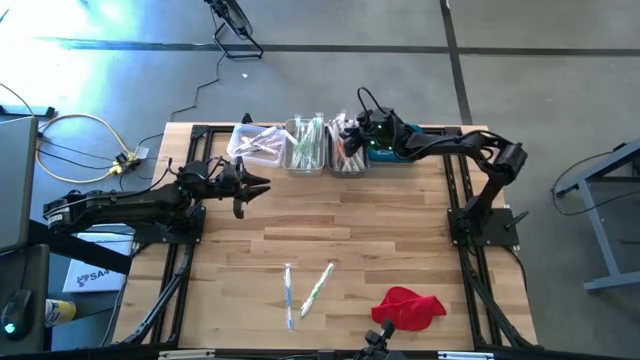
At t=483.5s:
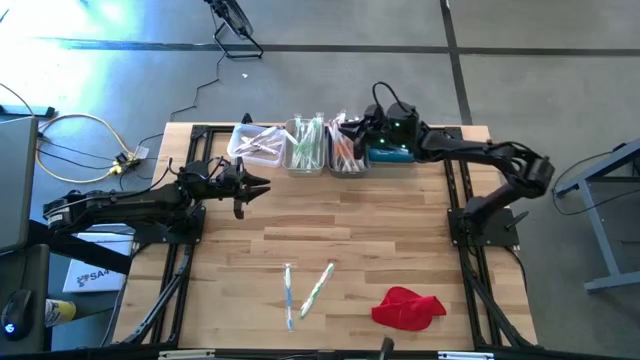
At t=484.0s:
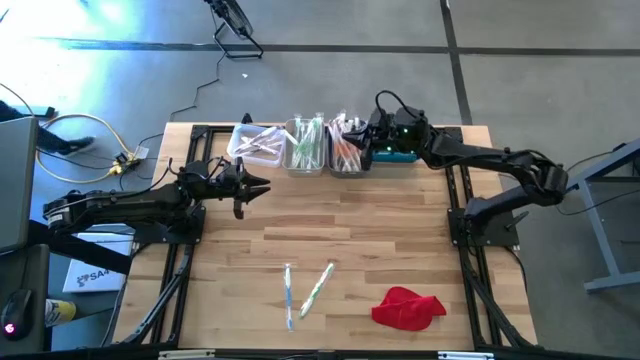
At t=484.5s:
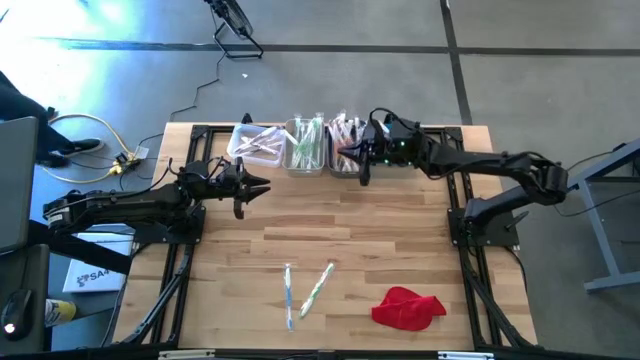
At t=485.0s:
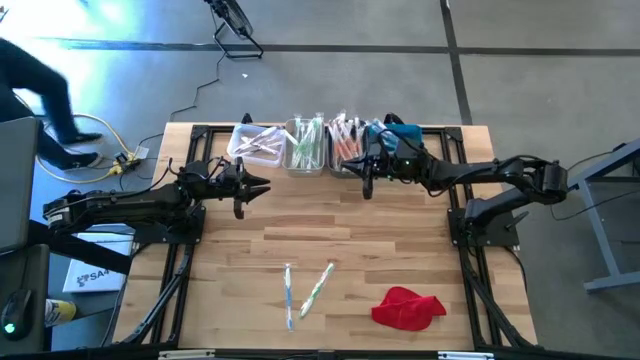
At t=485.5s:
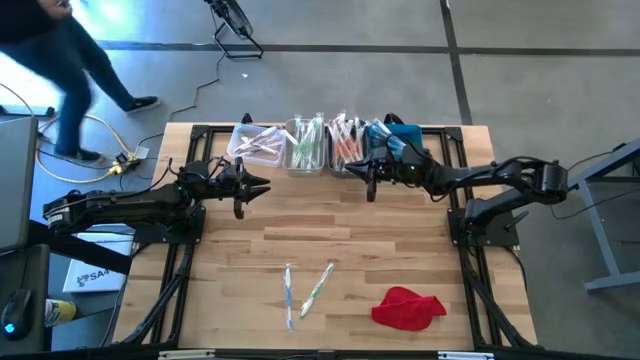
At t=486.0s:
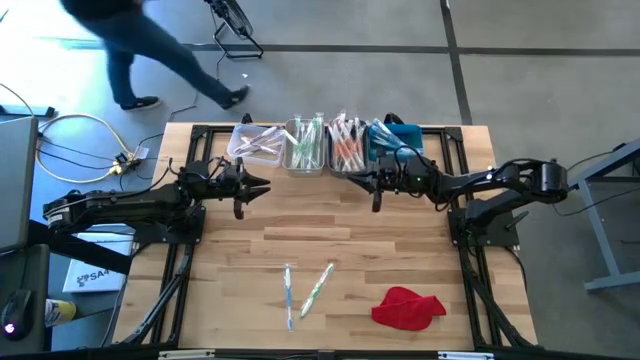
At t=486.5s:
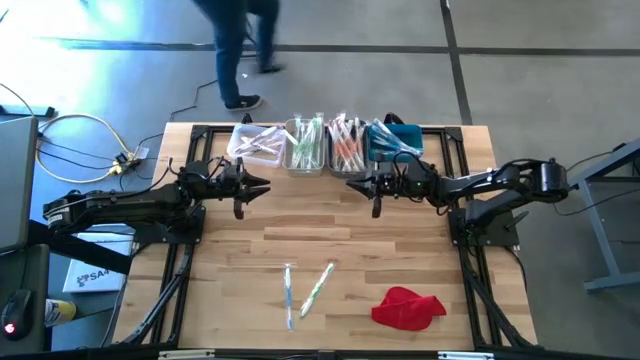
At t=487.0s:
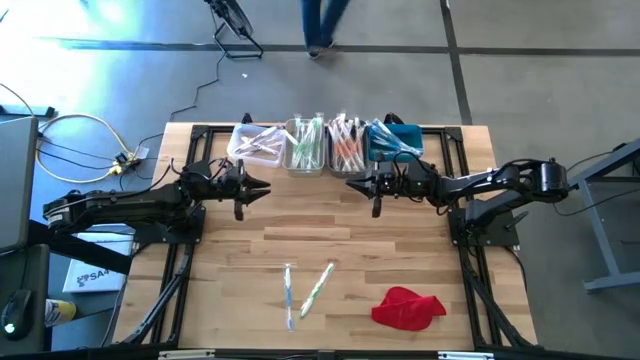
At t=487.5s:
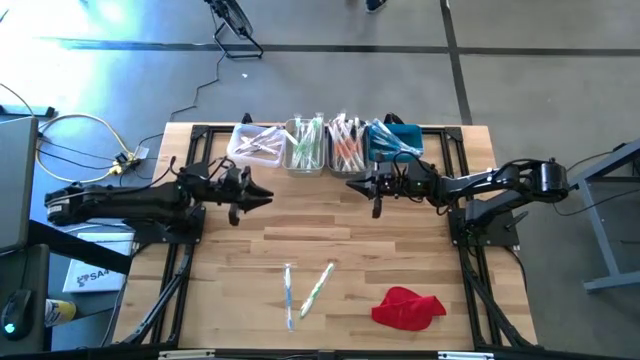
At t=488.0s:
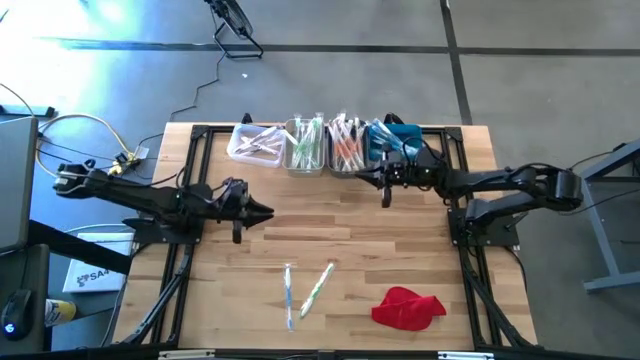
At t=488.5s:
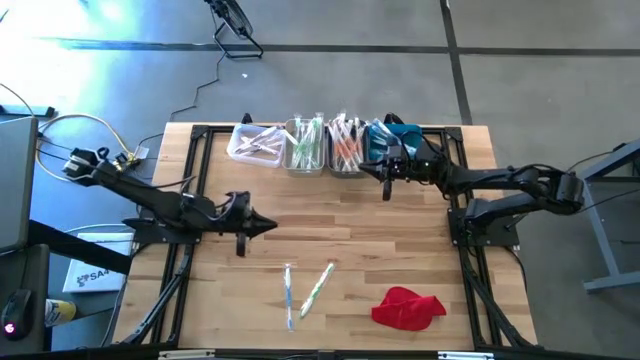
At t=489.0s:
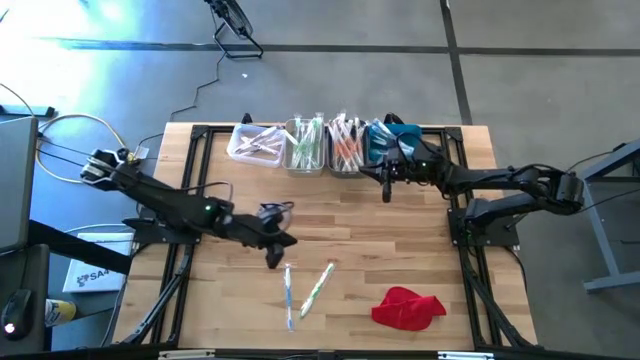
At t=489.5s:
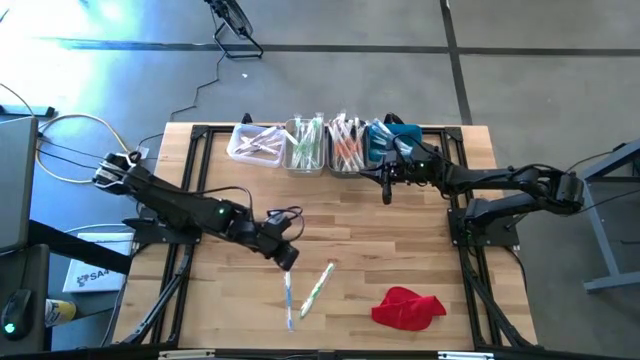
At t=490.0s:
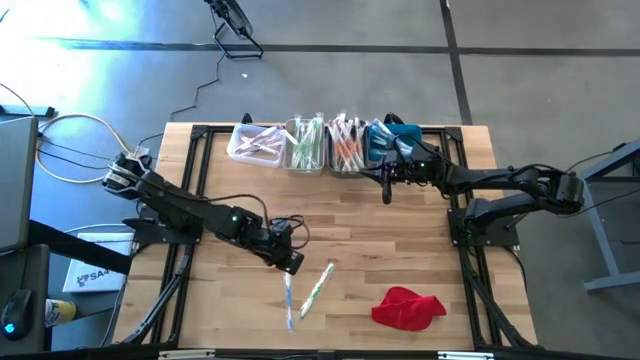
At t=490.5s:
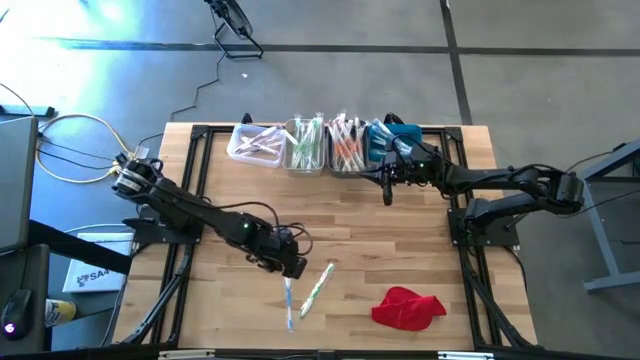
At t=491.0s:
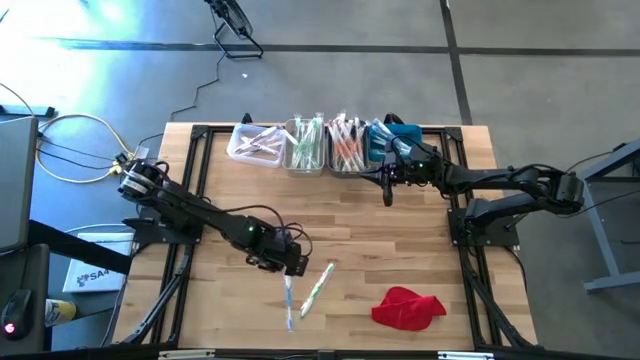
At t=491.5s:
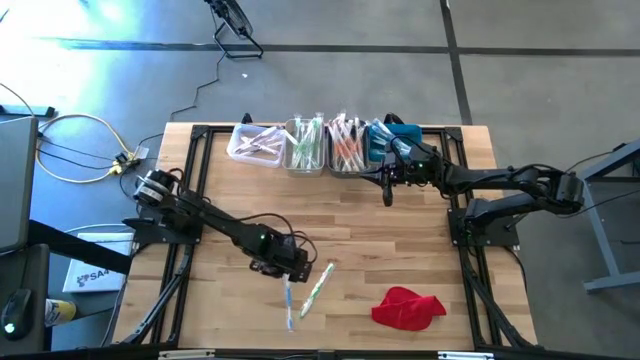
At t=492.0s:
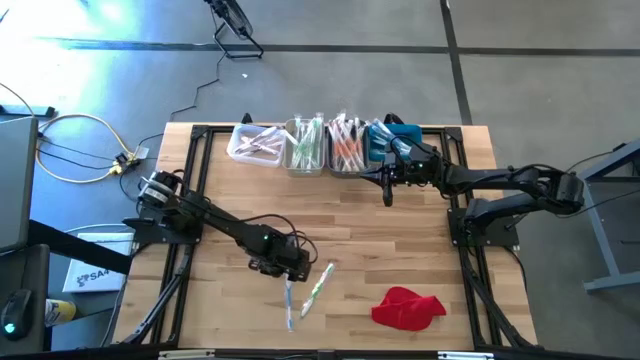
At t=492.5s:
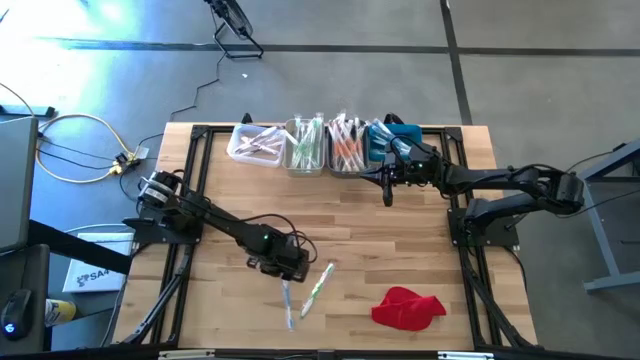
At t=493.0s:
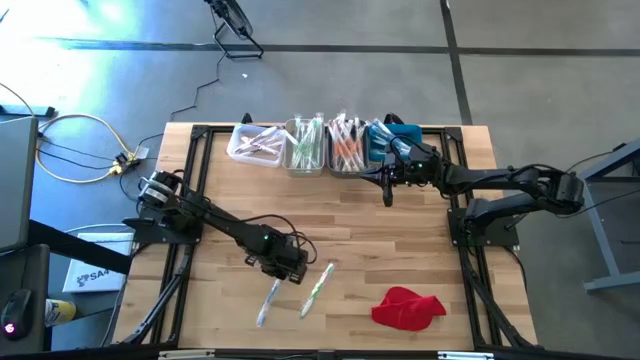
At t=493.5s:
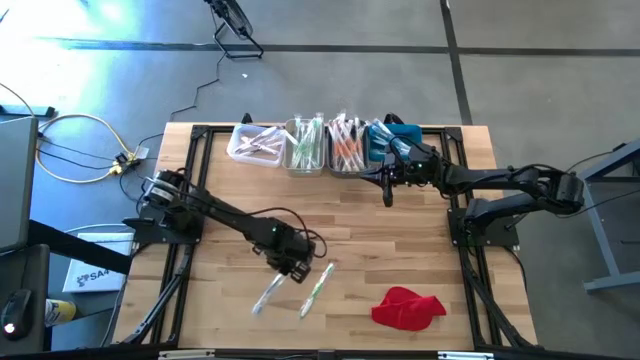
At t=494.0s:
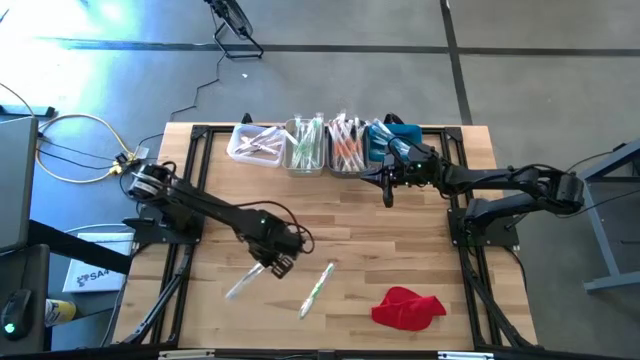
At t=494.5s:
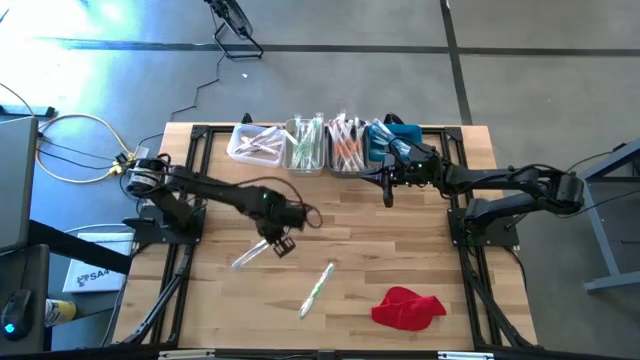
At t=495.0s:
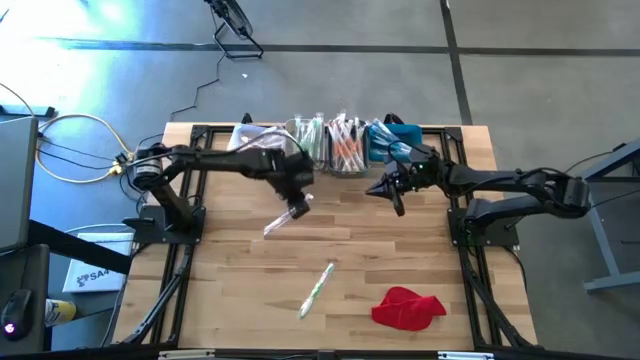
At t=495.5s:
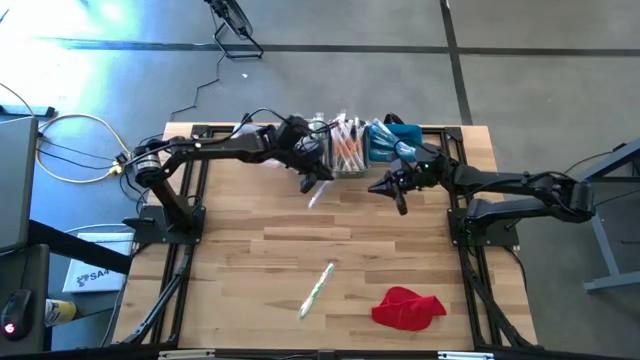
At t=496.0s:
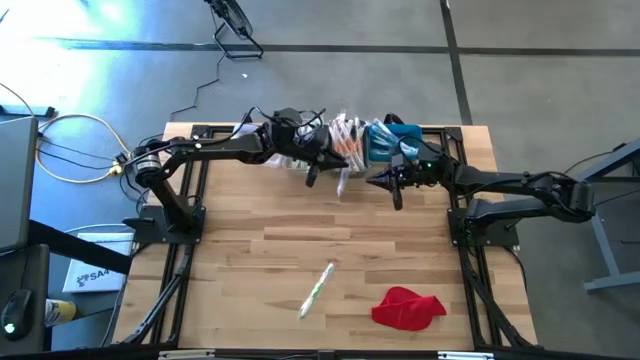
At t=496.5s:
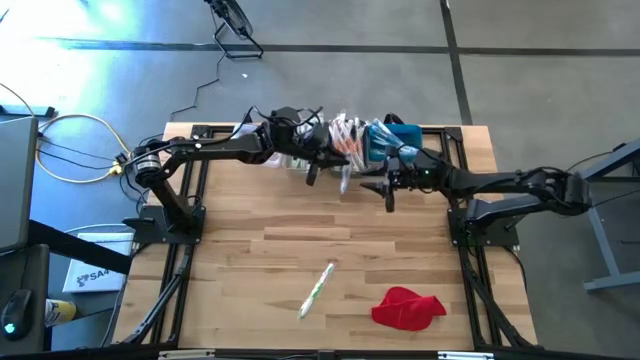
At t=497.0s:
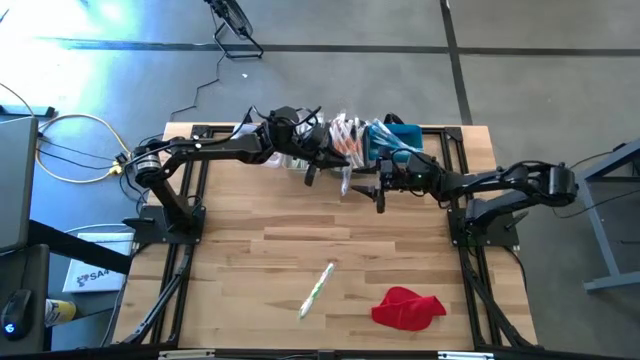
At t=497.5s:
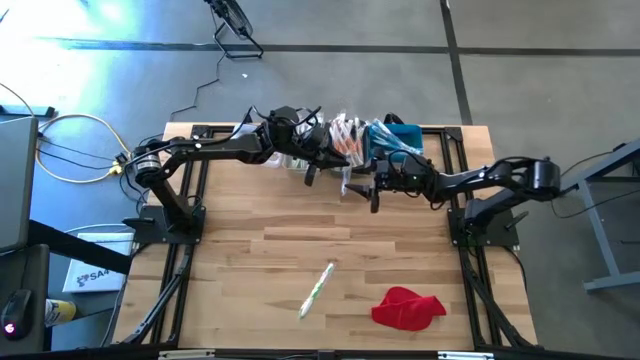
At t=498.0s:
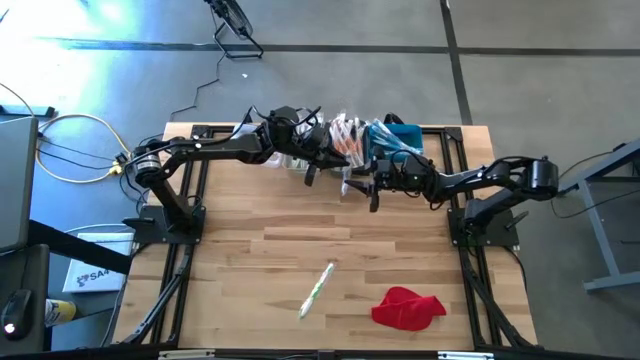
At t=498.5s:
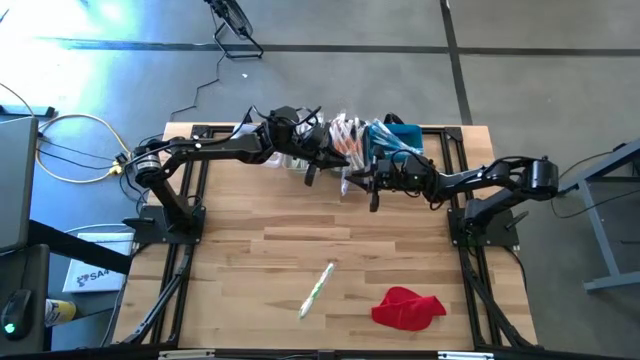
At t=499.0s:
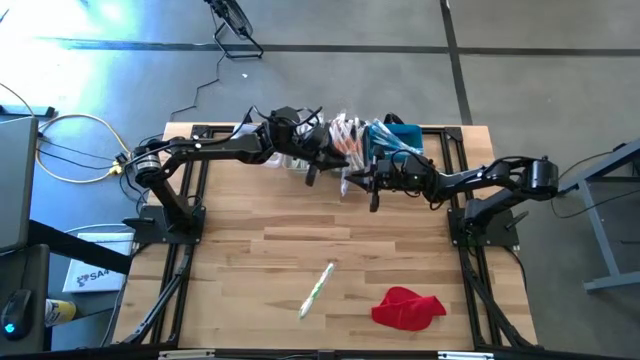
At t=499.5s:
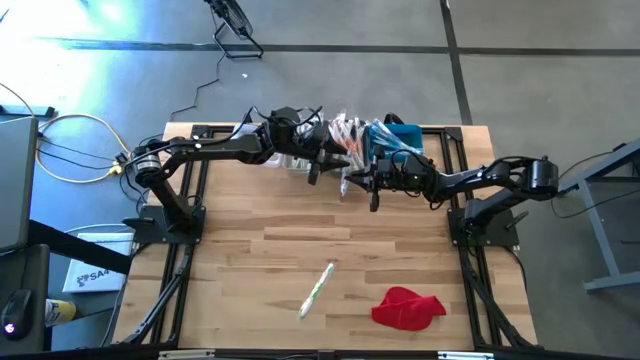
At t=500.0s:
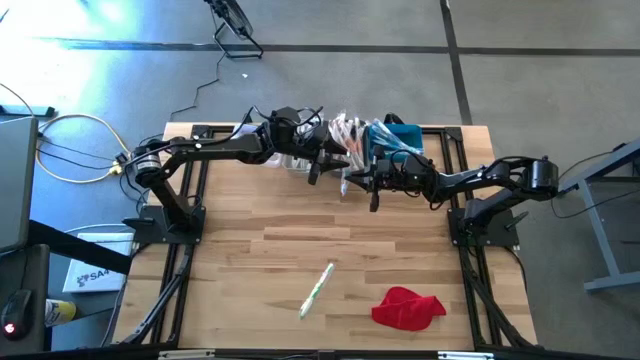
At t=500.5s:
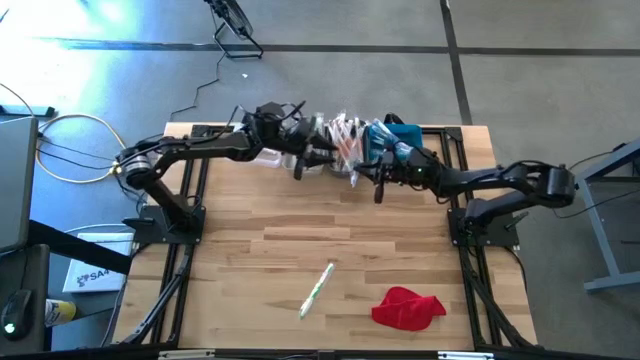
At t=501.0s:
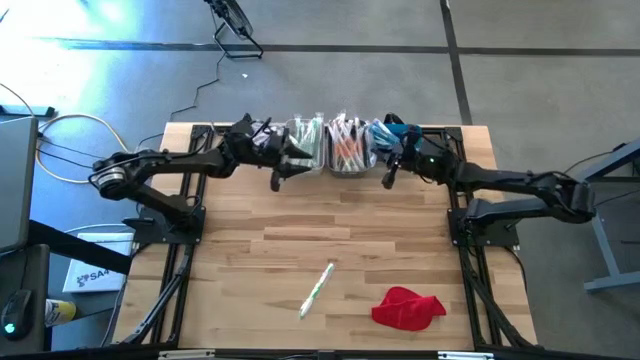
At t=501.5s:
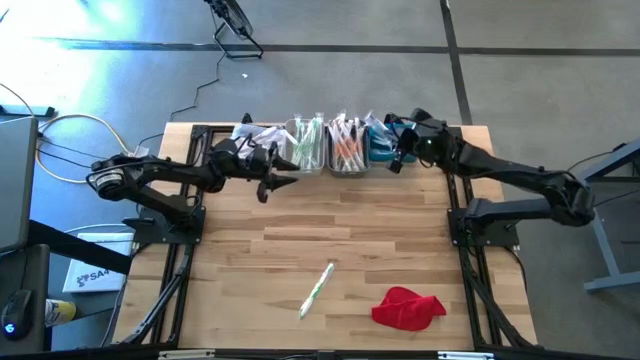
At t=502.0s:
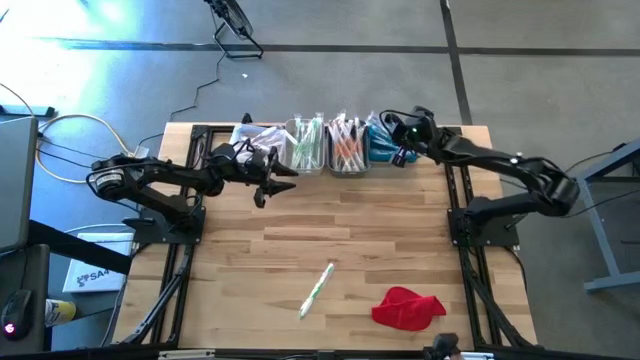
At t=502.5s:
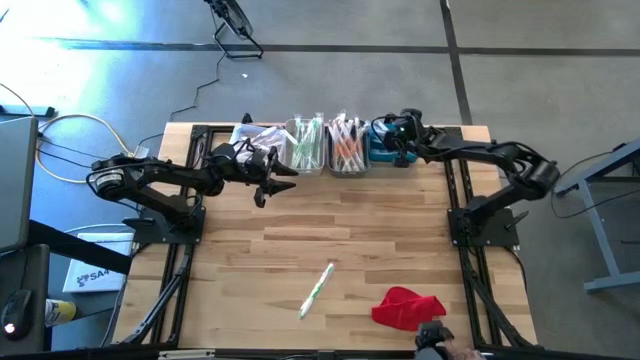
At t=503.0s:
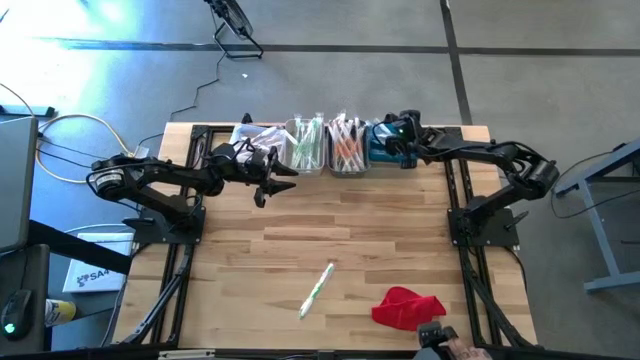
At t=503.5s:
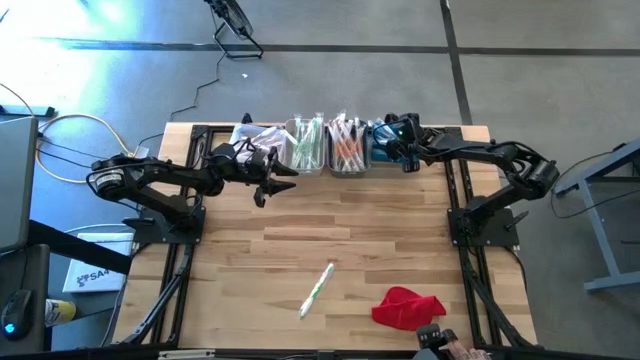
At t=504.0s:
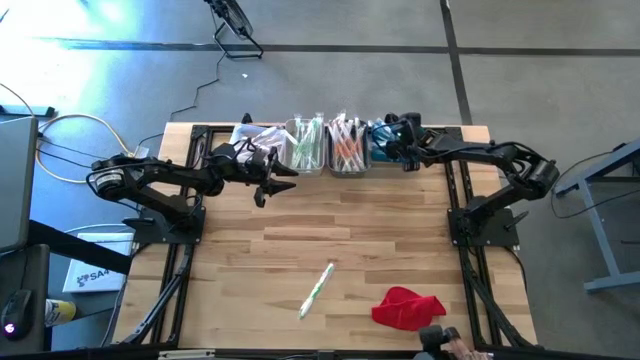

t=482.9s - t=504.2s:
Task: Pick & Place Toothbrushes
Put the blue toothbrush into the blue bin

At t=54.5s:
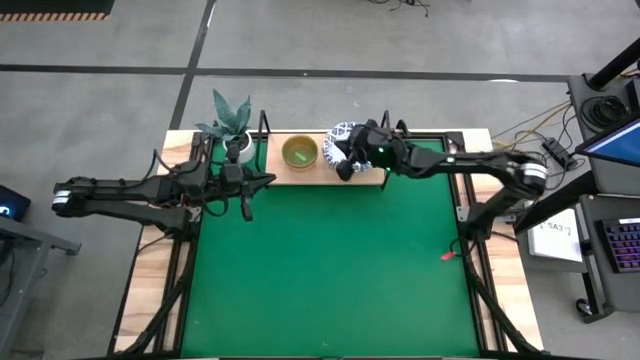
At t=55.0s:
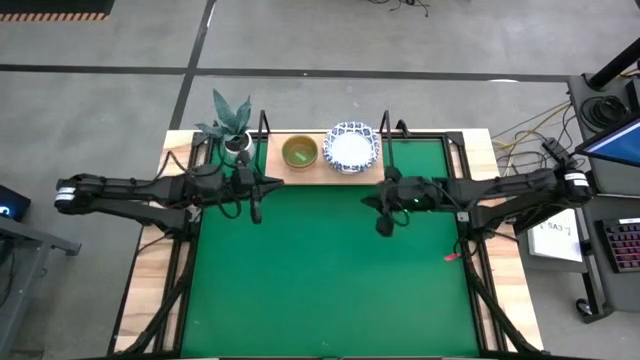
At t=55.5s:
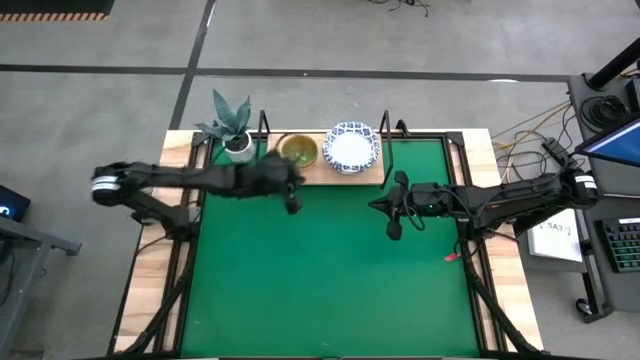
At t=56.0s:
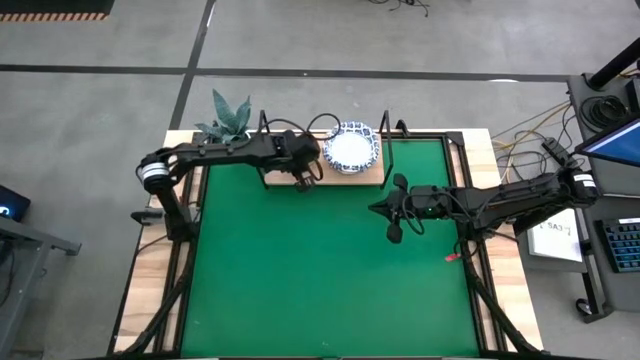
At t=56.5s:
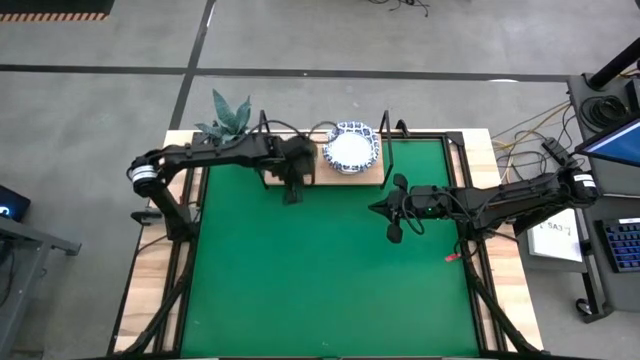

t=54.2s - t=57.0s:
Task: Place and stack bowls onto a shelf
Adjust the stacked transparent bowls on the shelf
